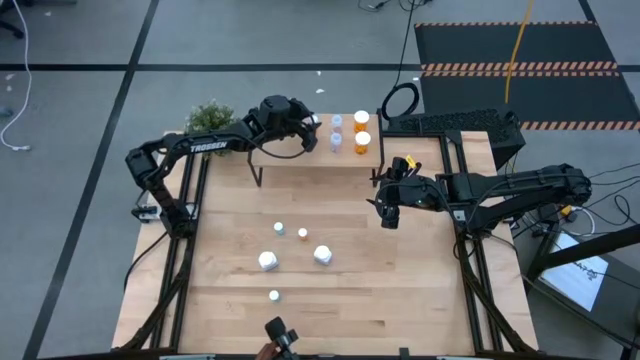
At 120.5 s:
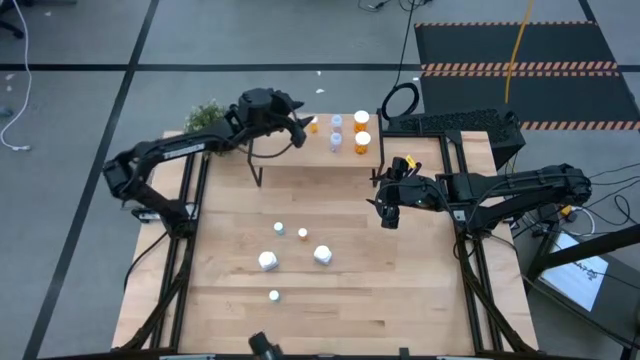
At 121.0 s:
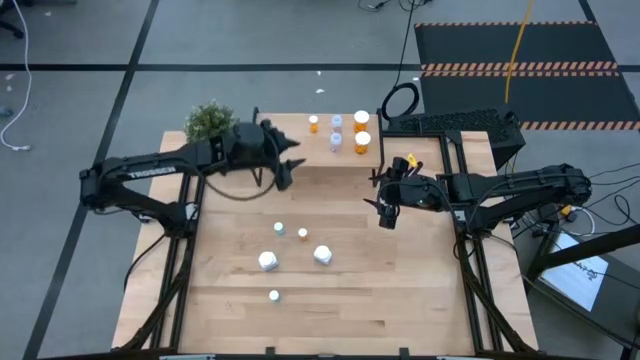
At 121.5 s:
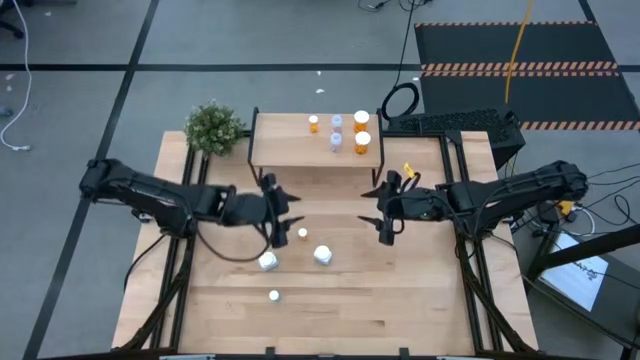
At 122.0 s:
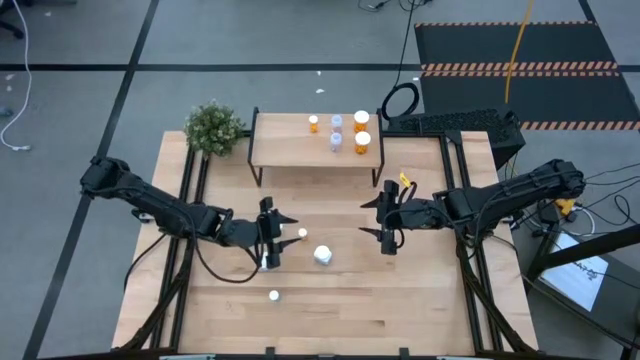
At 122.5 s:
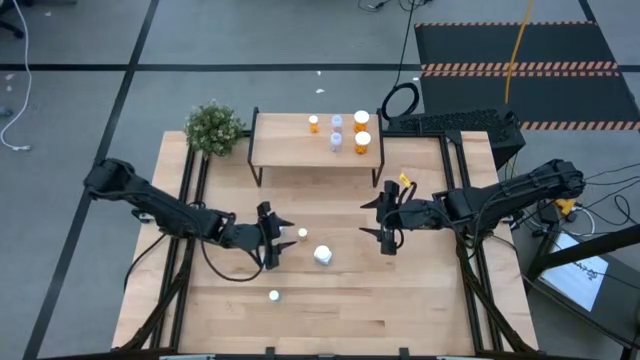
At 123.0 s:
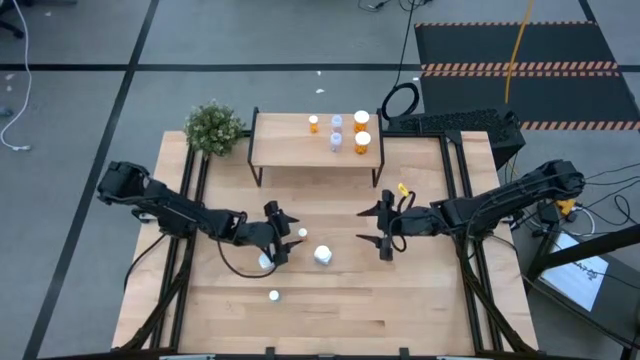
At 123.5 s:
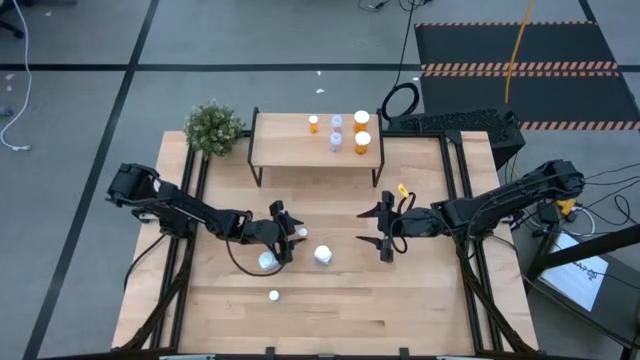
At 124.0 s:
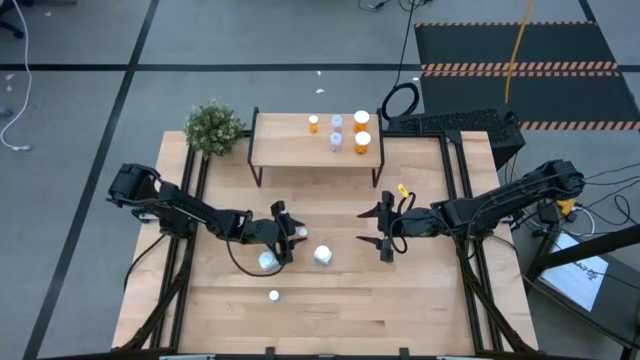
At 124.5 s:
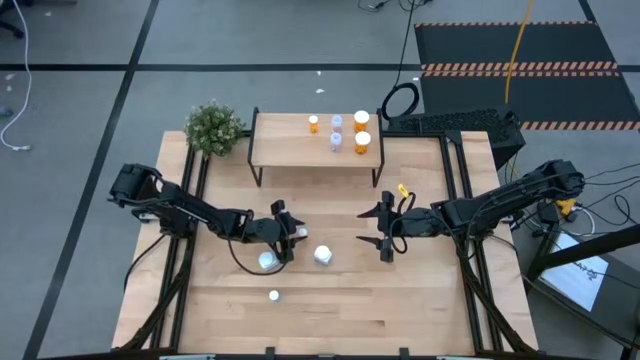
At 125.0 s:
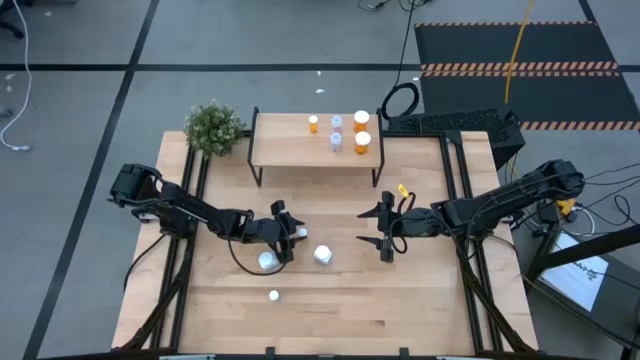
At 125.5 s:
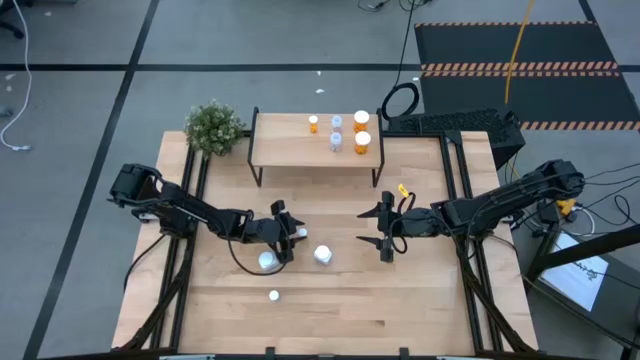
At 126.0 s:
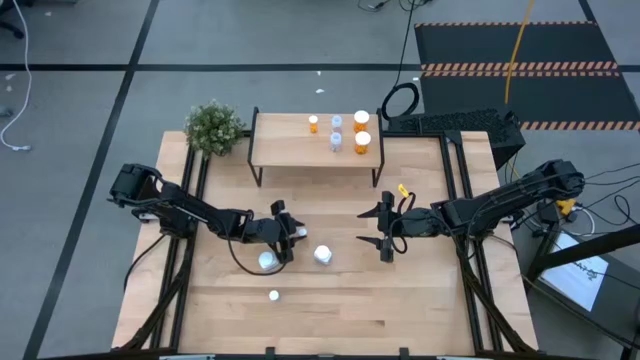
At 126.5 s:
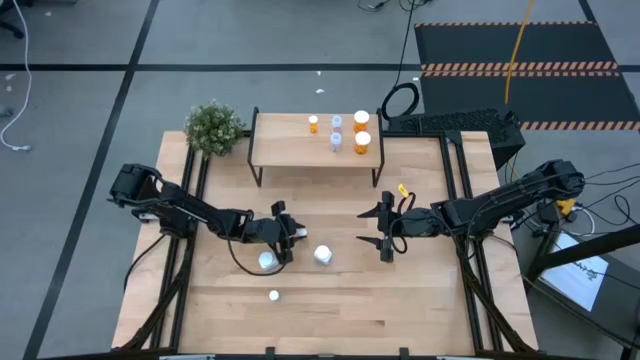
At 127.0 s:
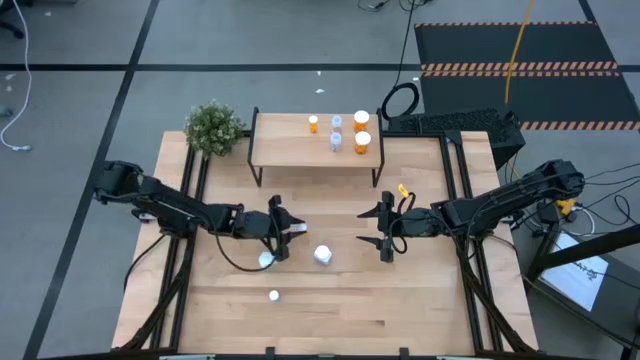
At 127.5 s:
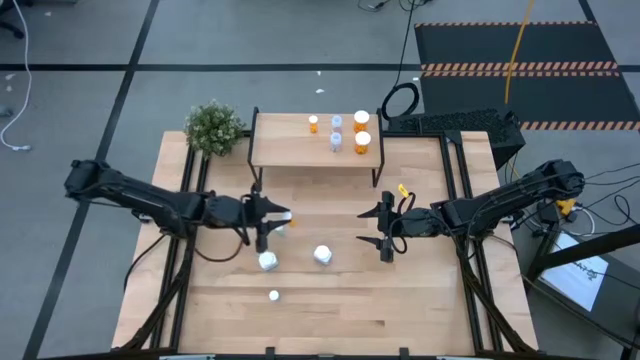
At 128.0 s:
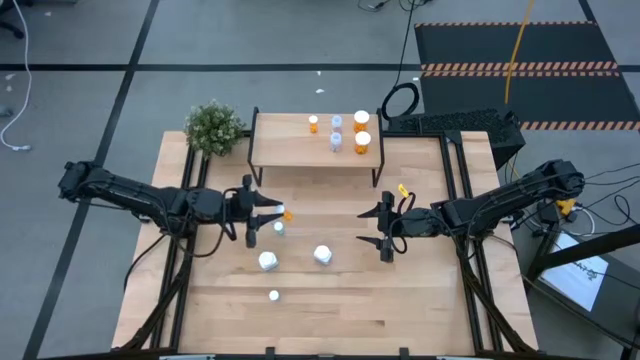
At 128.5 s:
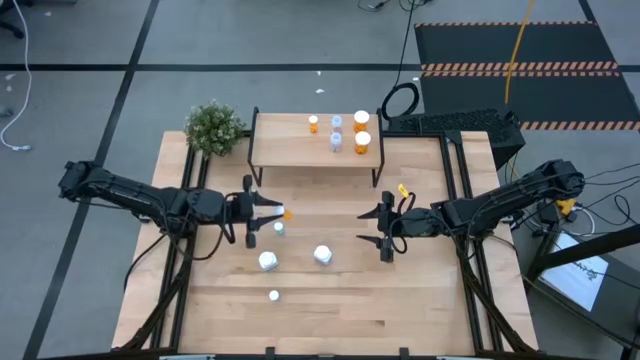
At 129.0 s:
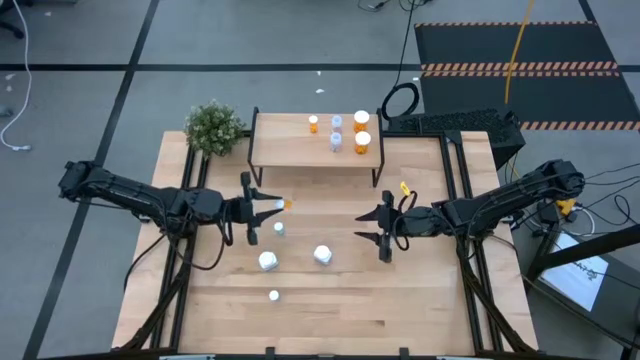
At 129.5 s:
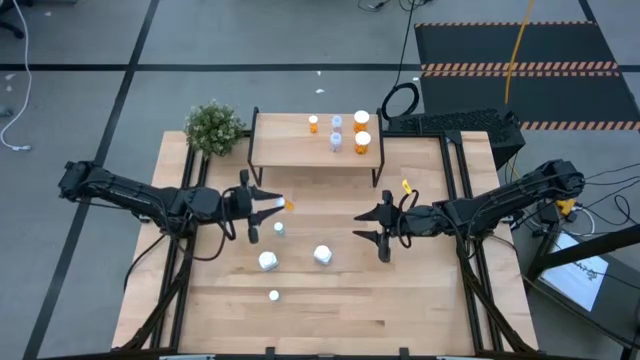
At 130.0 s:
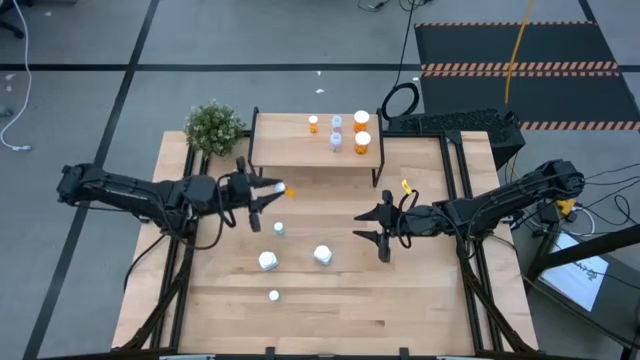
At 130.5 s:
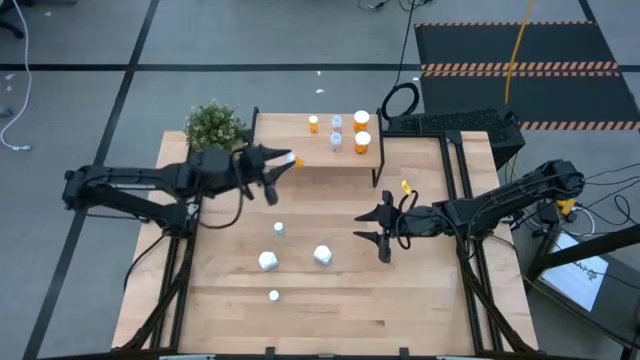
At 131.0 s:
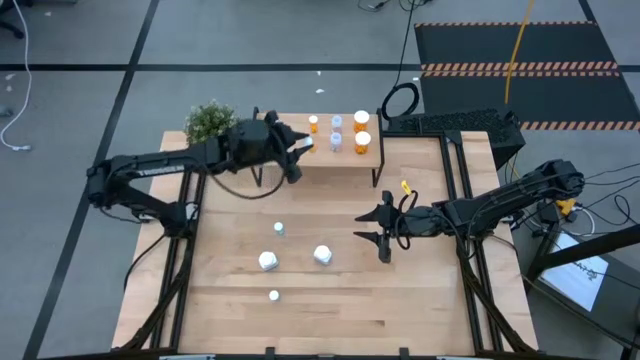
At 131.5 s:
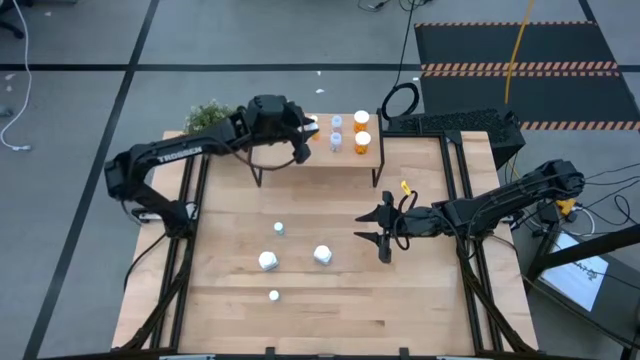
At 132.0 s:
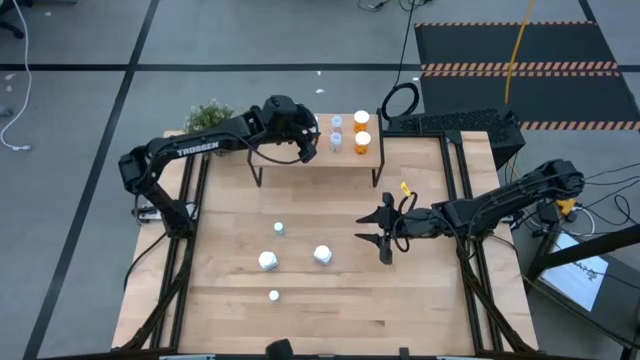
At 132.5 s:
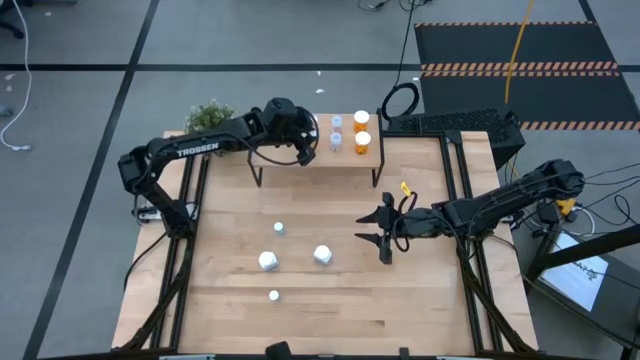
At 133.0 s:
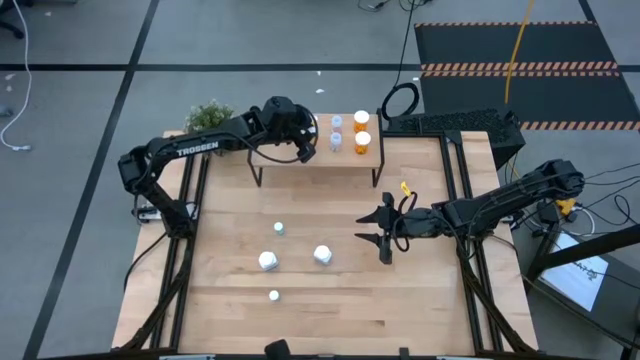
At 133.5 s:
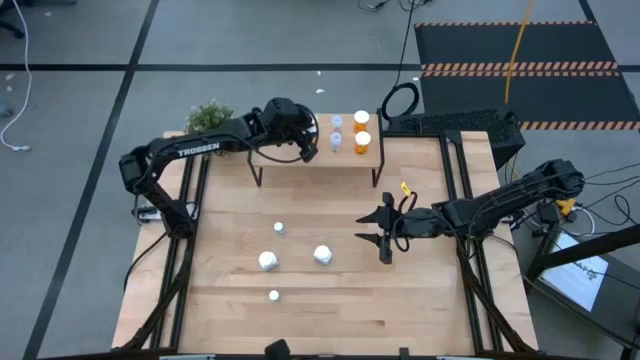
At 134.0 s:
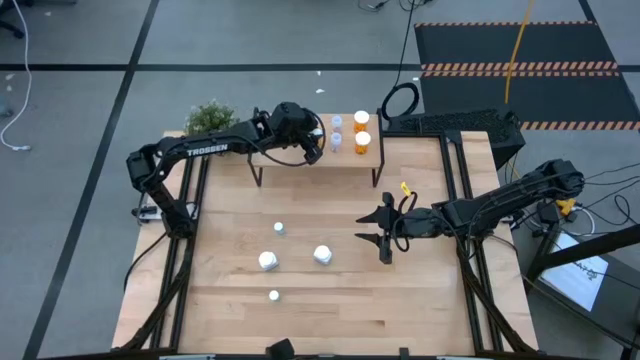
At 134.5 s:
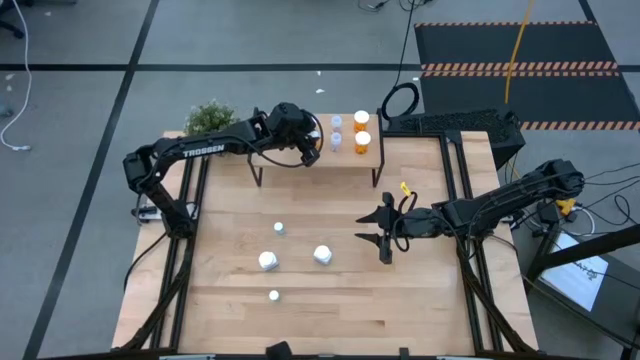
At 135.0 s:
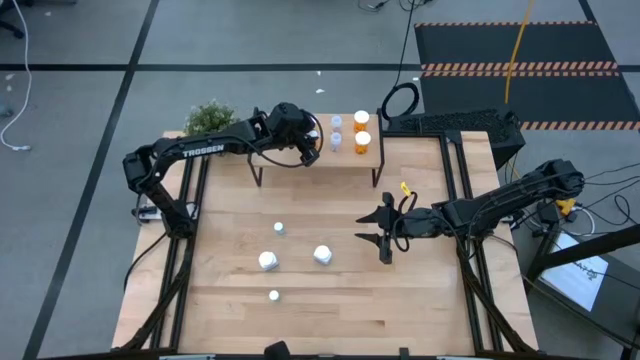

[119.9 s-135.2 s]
Task: Pick and place medicine bottles onto shelf by color
Put the small orange pill bottle on the shelf aligned with the small orange pill bottle

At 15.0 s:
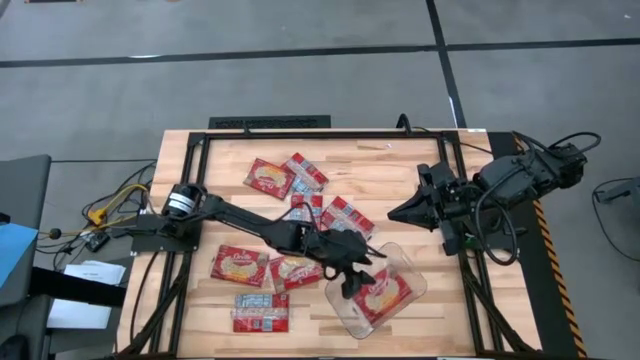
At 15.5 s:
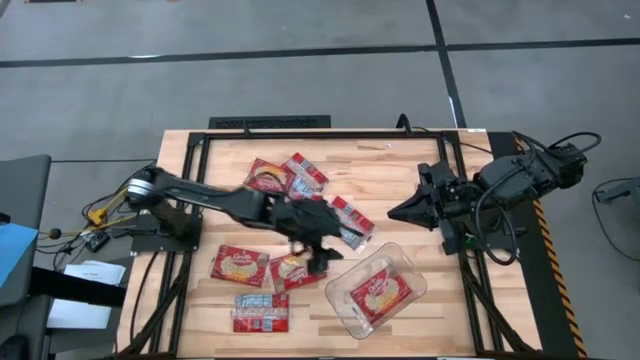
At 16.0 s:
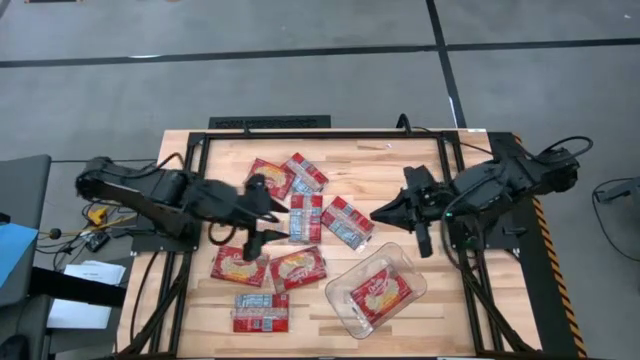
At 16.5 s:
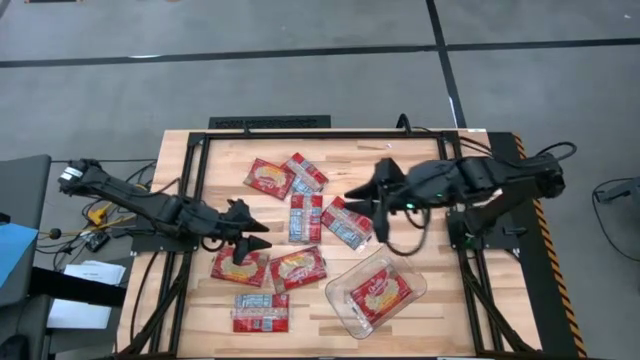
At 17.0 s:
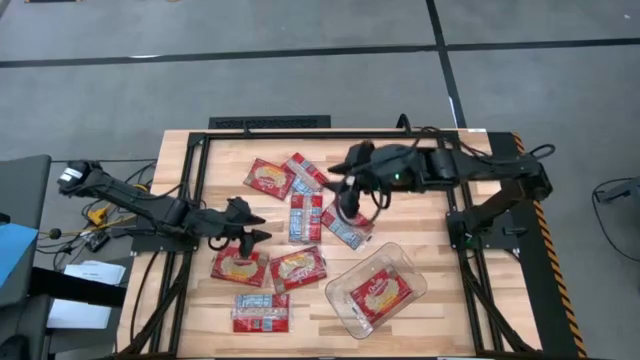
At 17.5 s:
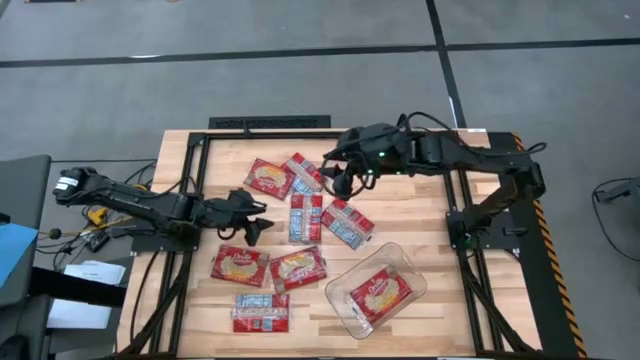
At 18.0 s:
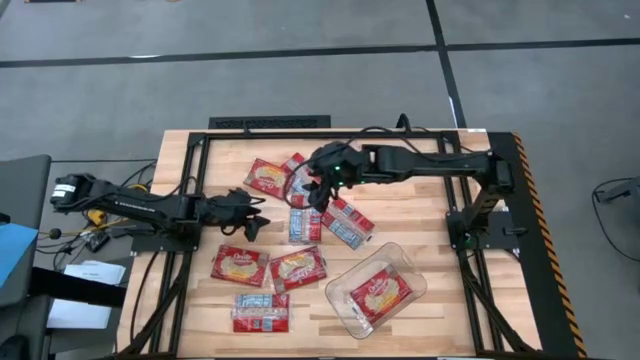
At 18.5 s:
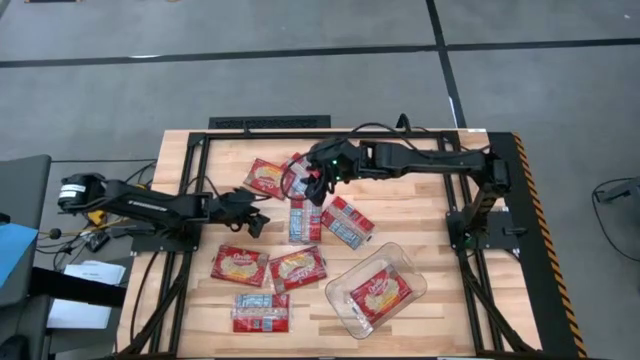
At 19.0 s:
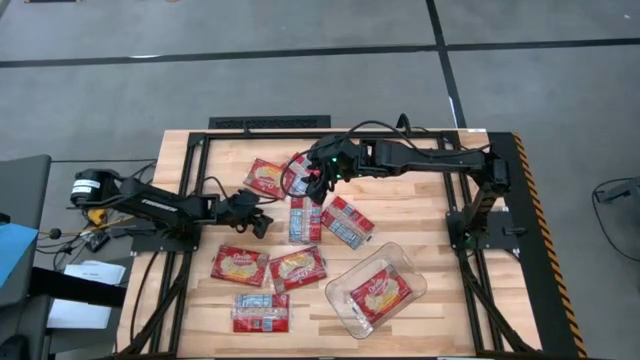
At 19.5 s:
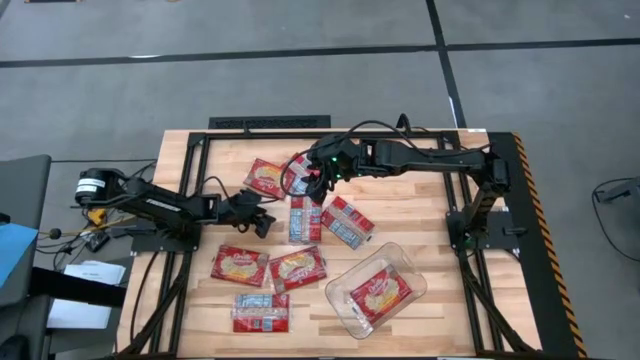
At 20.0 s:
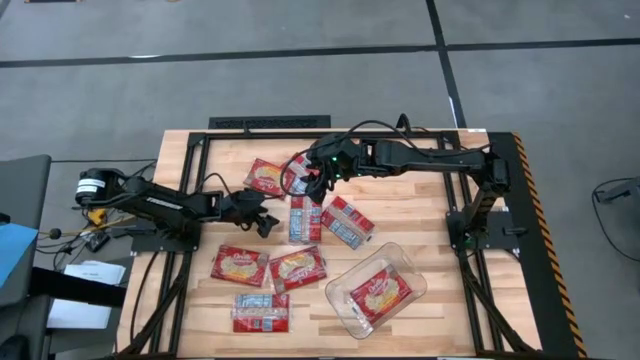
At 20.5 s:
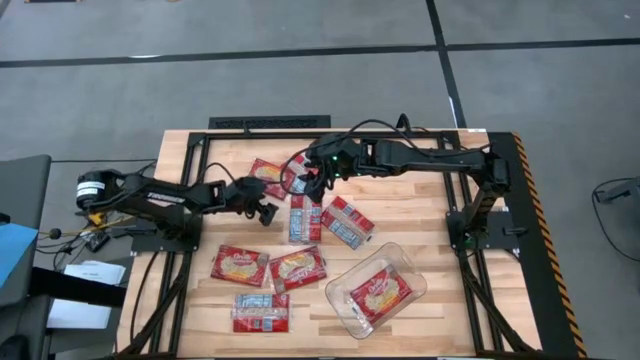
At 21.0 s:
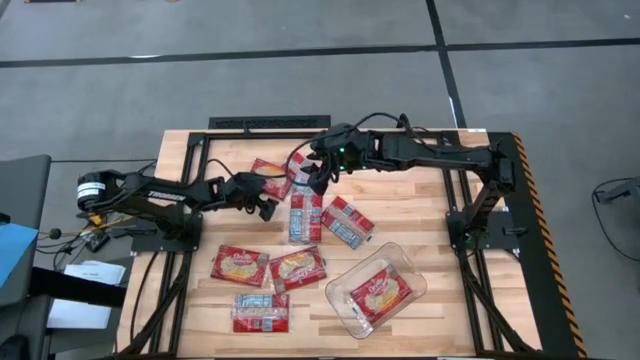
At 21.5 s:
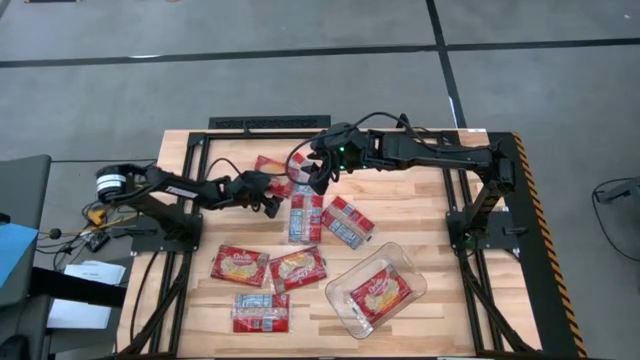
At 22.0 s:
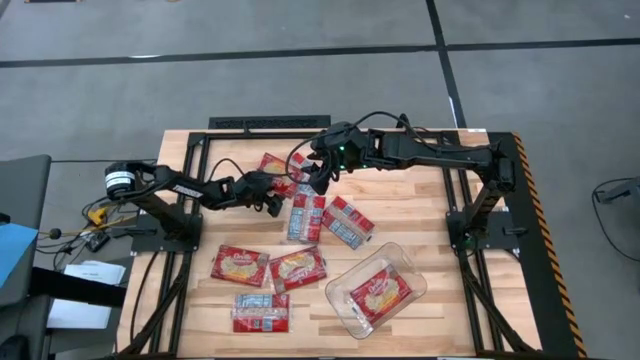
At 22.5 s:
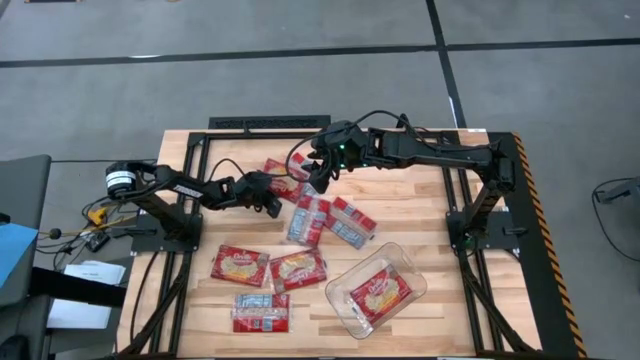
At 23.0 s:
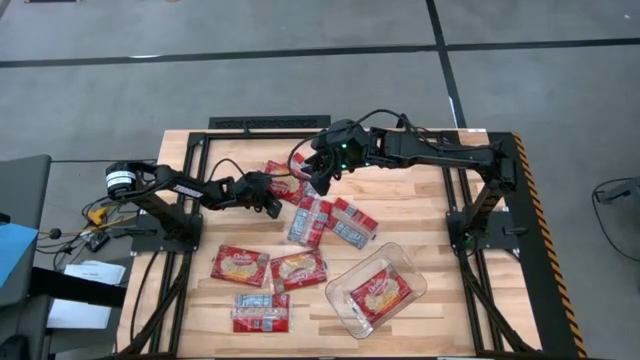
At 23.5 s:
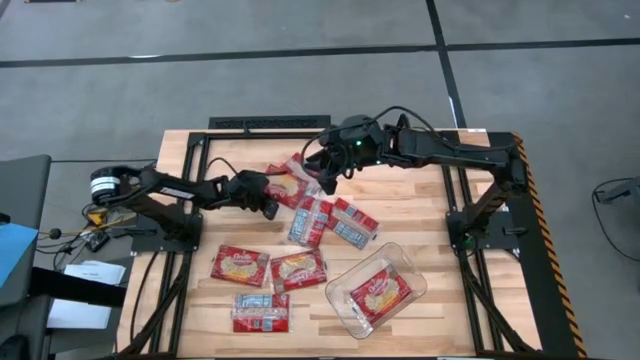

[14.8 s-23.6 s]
Task: Sort popcorn bags into baskets
Put the red popcorn bag into the transparent bin
